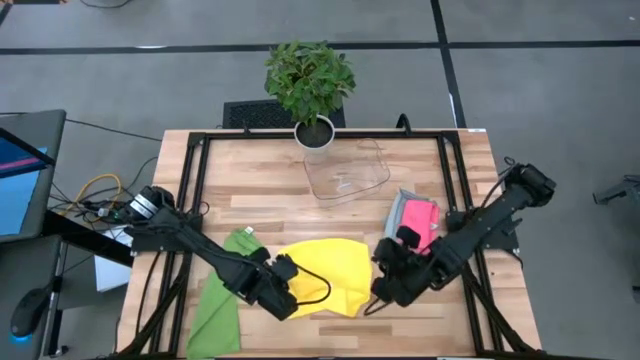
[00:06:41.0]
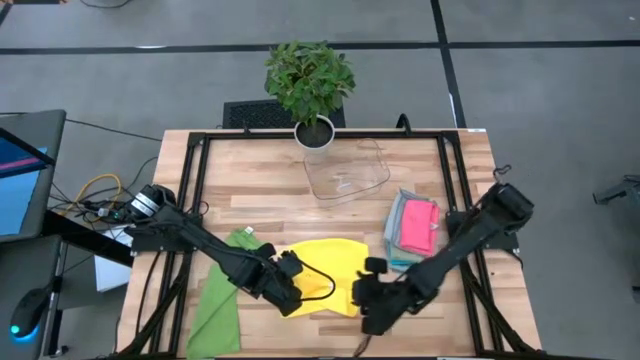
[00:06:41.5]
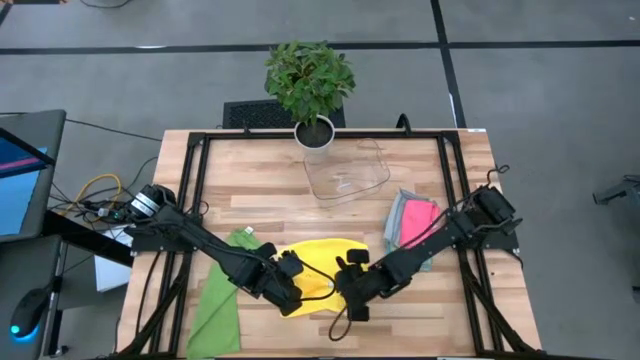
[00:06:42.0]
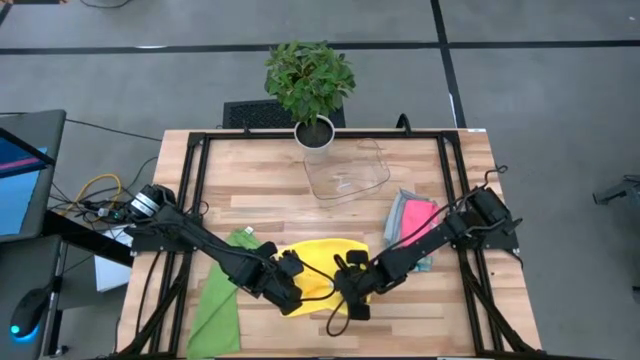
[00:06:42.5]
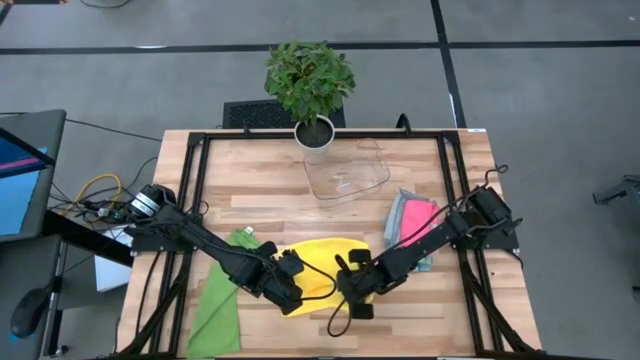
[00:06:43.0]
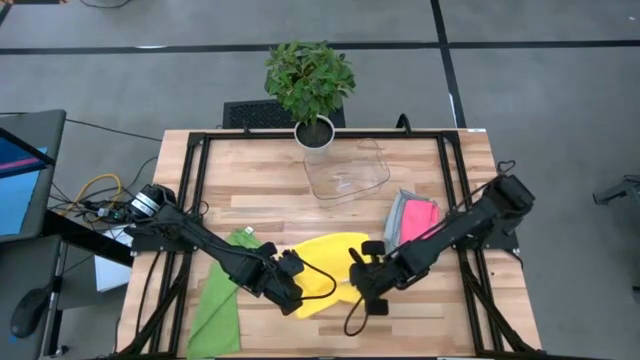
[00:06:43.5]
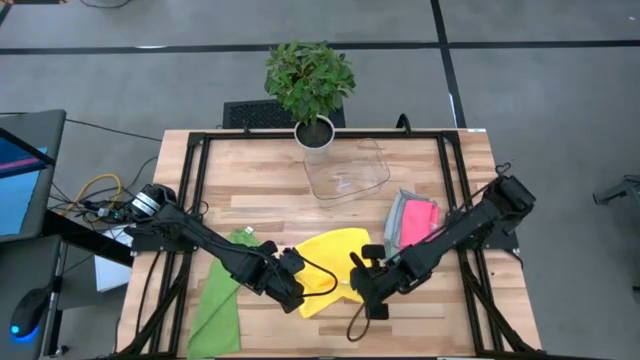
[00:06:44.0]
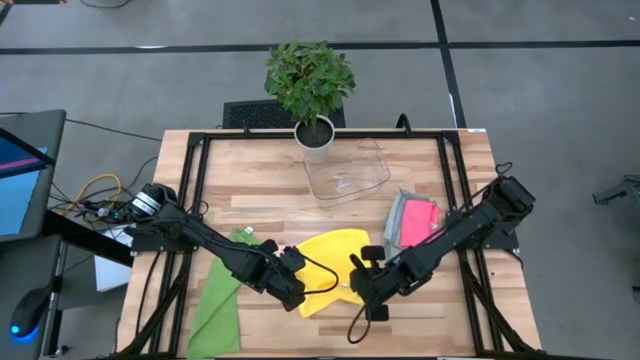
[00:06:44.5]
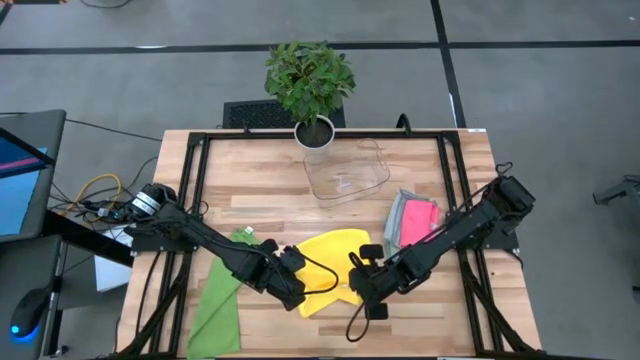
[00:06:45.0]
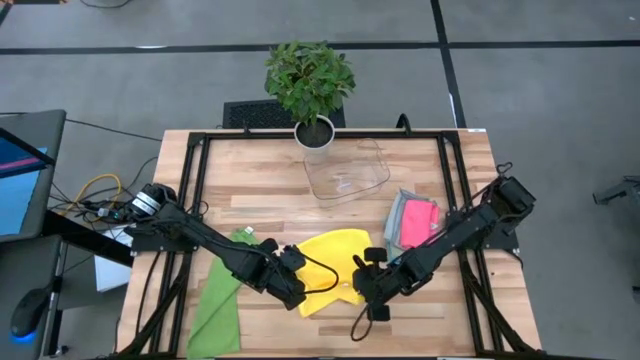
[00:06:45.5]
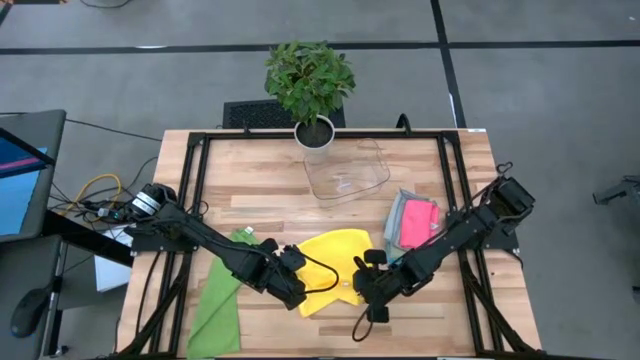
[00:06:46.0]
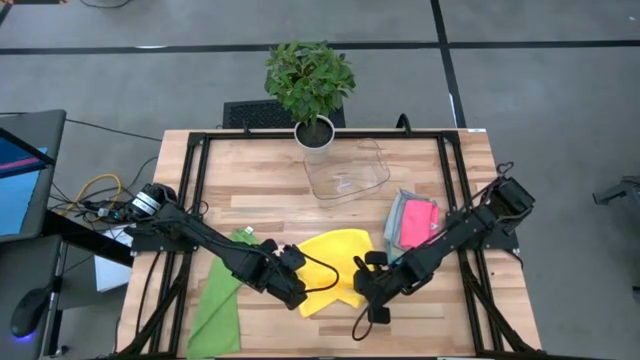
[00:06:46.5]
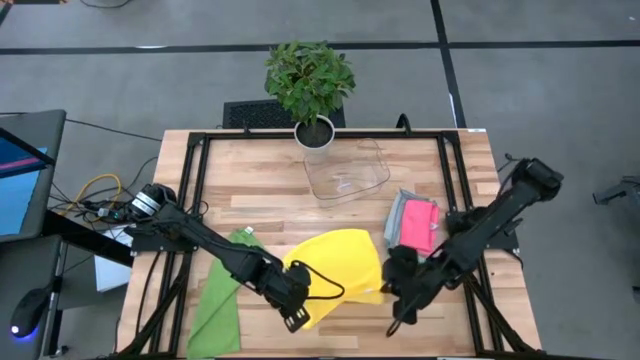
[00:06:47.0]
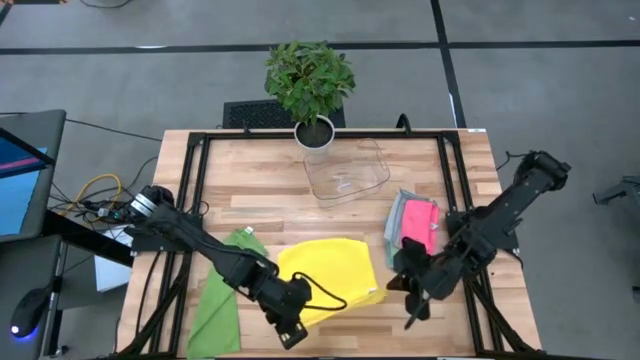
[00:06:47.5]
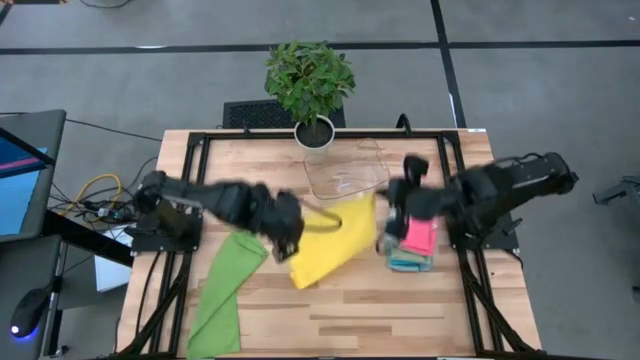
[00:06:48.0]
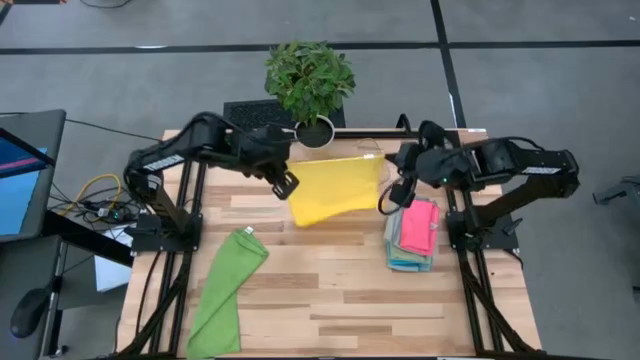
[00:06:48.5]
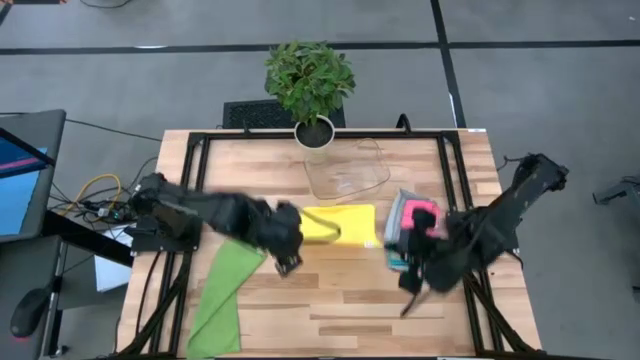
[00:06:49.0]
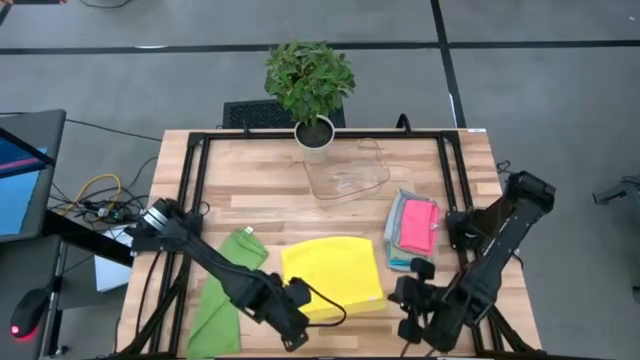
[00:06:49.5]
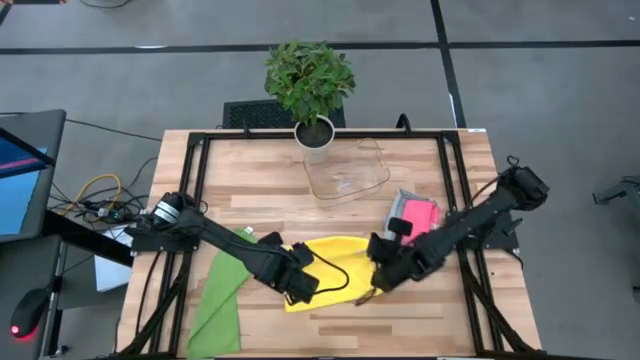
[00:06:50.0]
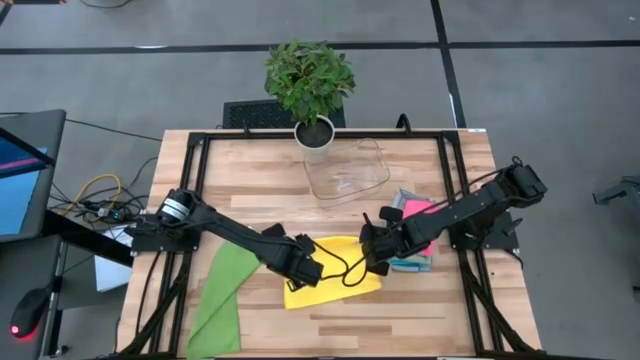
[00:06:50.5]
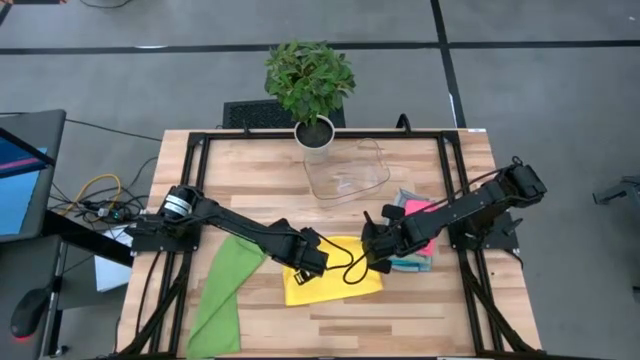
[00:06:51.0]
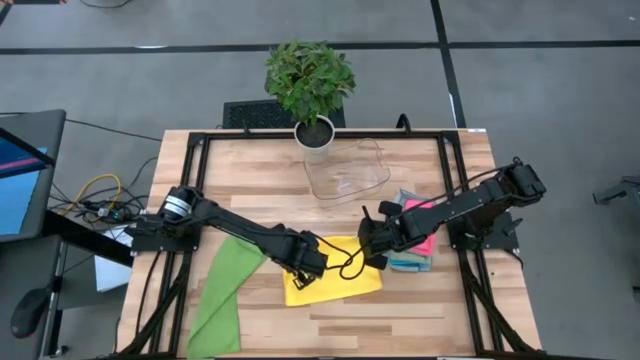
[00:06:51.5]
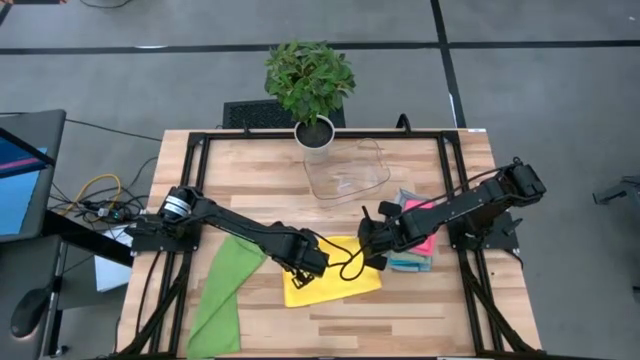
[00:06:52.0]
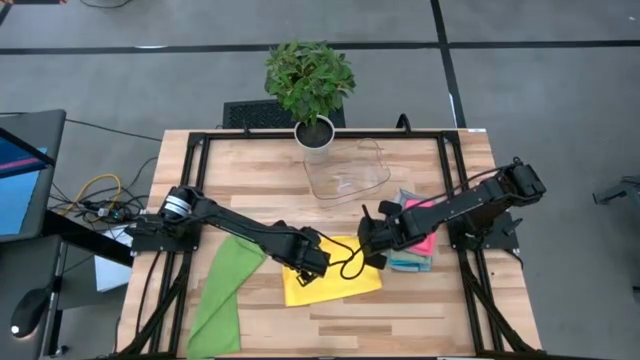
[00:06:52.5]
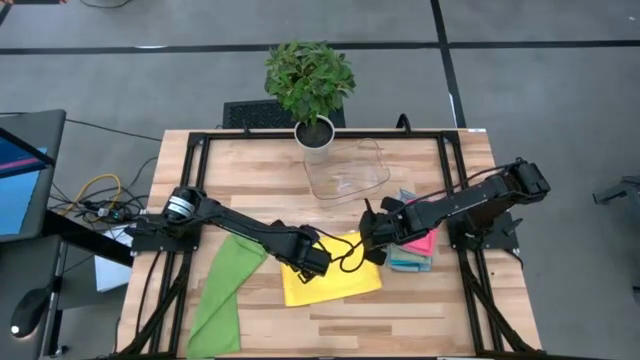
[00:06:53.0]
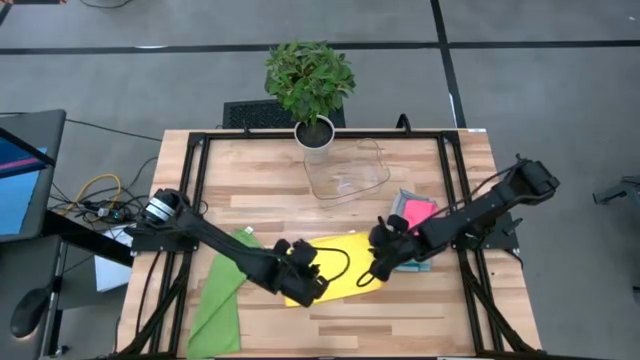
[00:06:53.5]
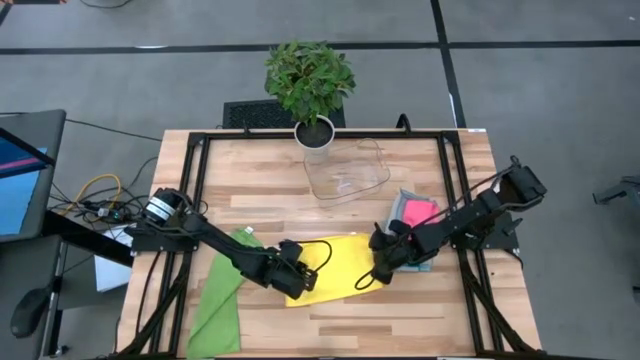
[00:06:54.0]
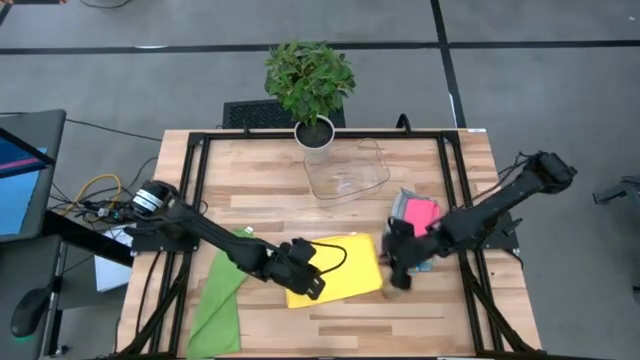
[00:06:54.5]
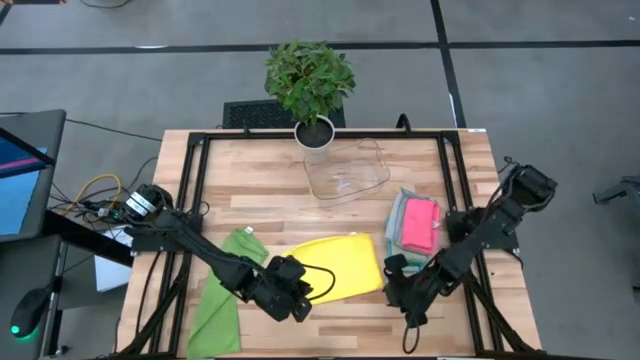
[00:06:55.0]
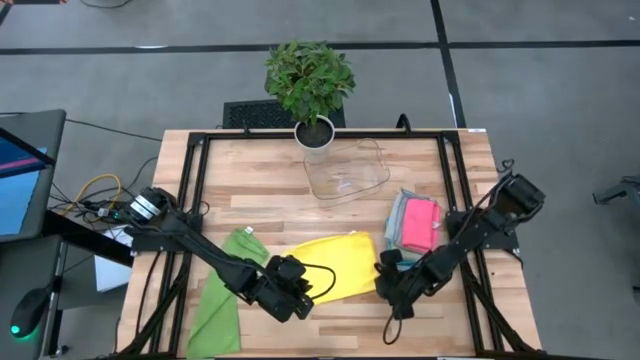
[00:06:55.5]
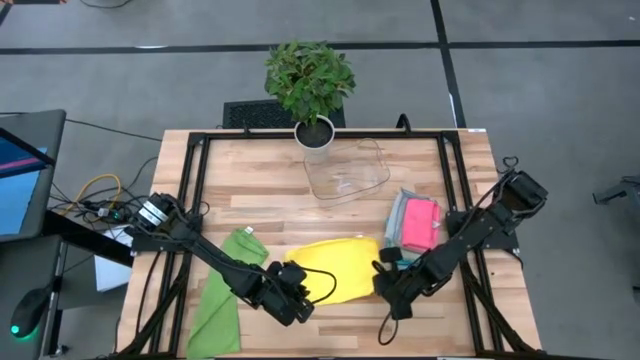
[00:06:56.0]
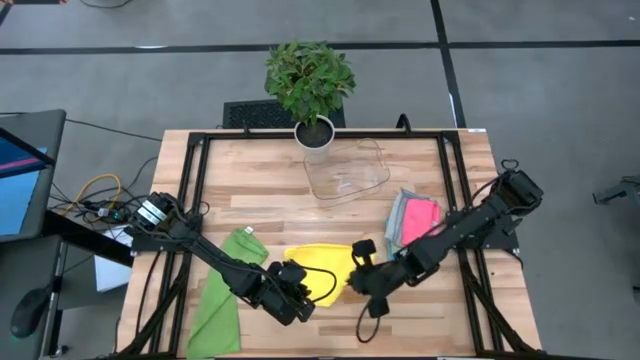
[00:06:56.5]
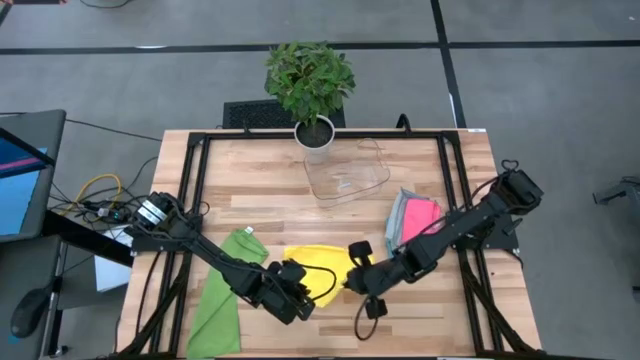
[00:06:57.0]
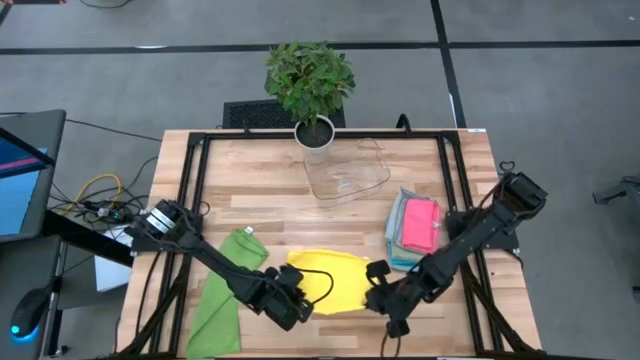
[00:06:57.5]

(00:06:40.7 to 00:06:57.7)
Task: Fold microfiber towels
Fold the yellow microfiber cloth
